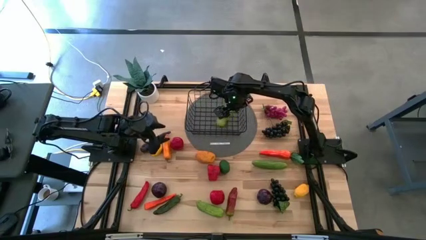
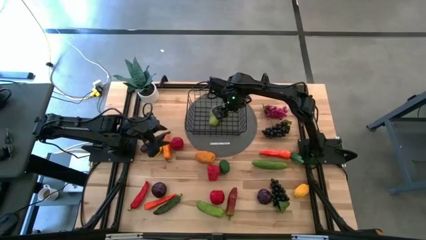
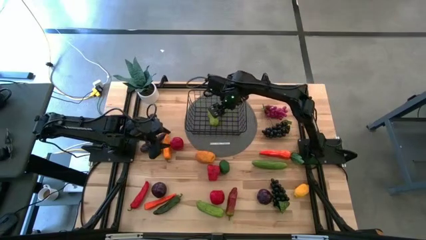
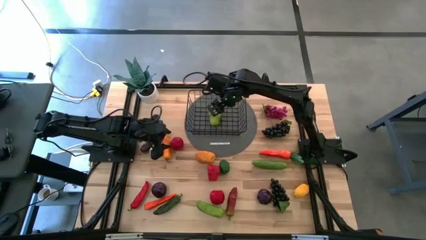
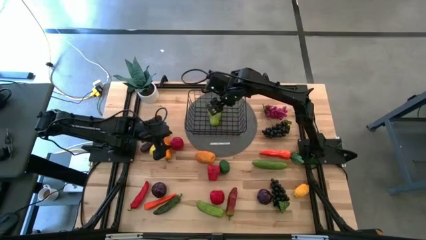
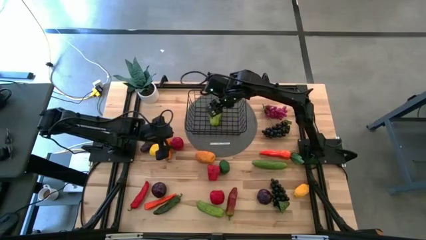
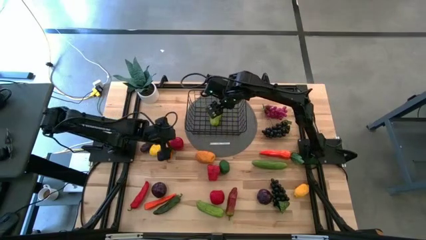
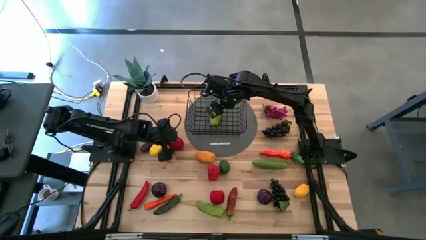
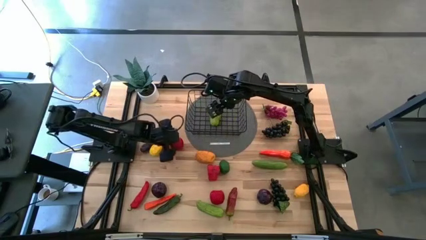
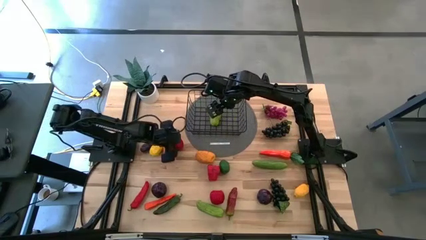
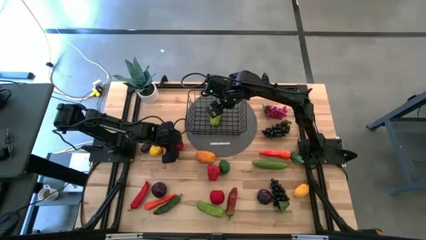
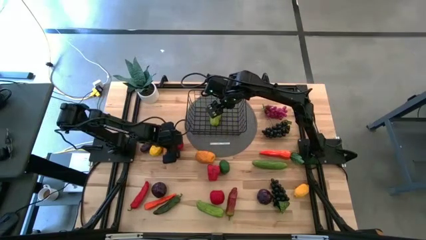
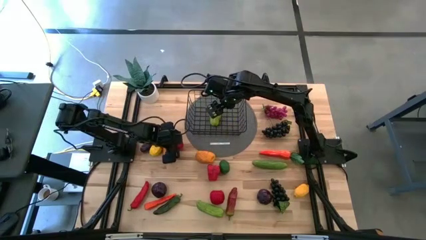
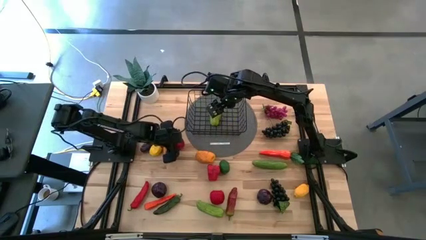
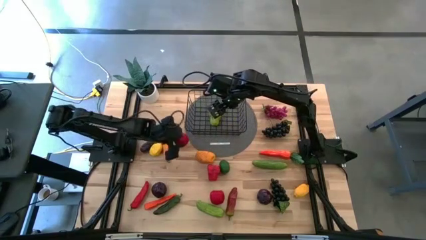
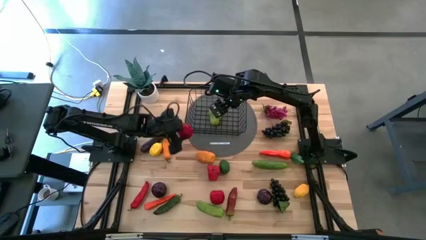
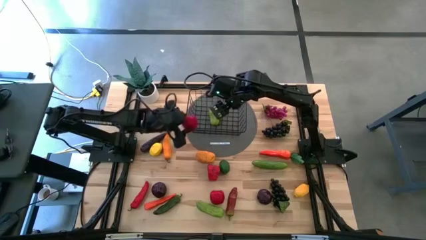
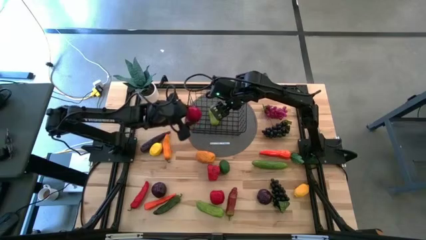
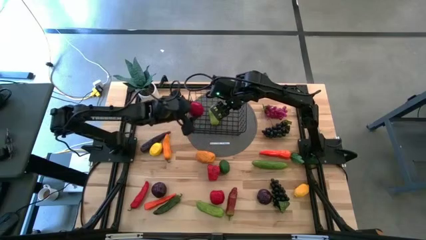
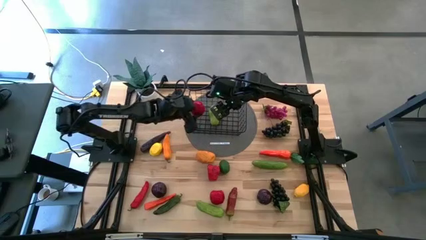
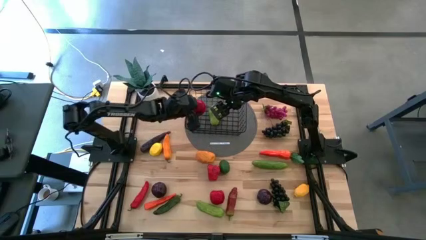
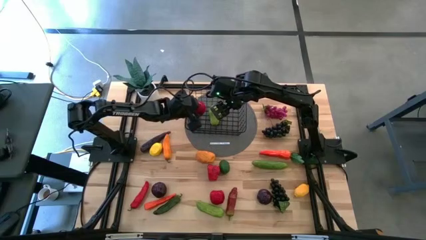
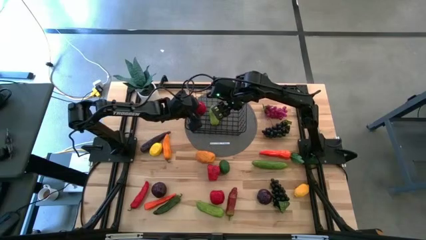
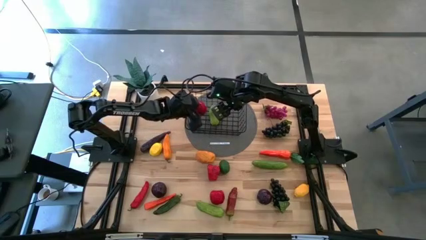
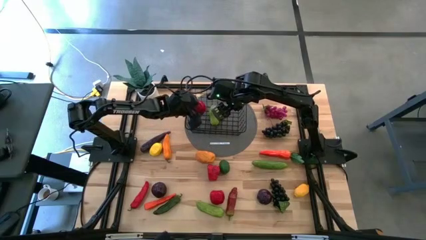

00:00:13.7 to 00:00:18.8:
Task: Build produce basket
Put the top apple into the wire basket

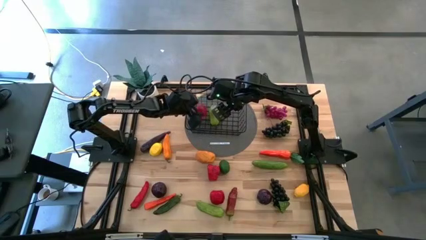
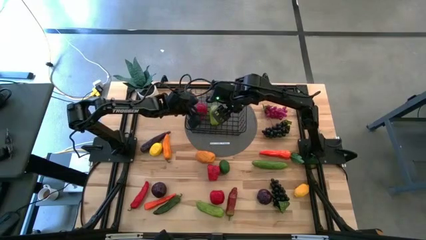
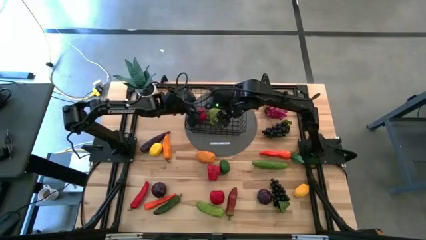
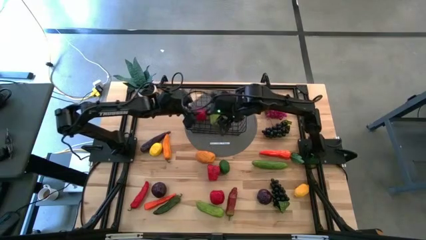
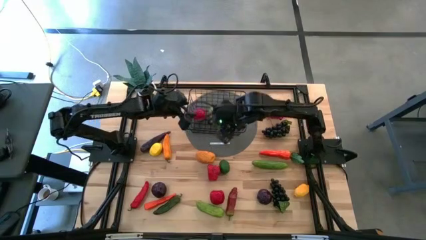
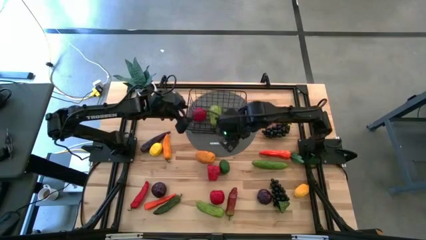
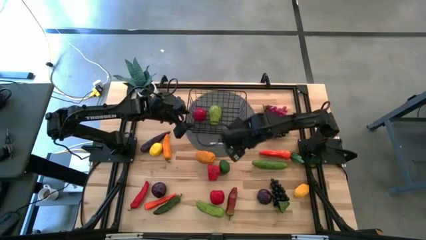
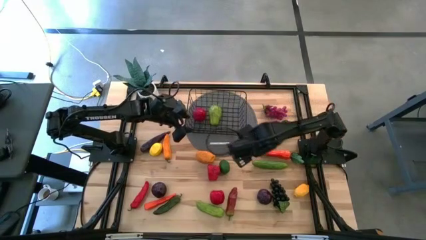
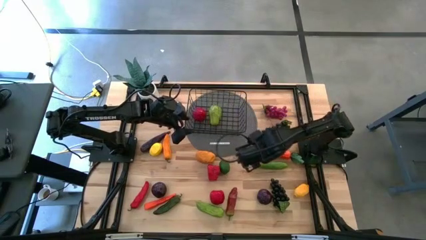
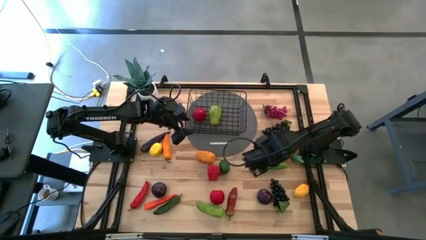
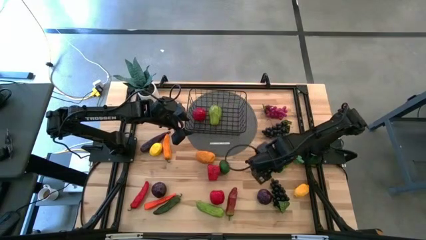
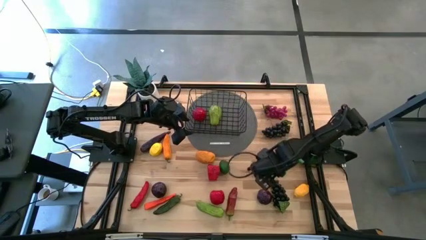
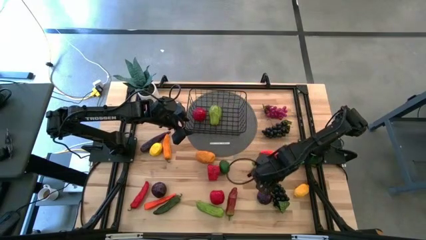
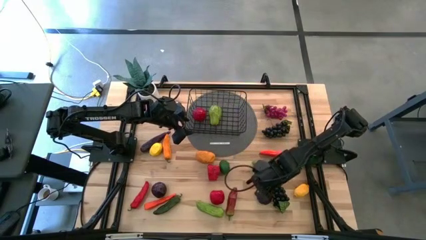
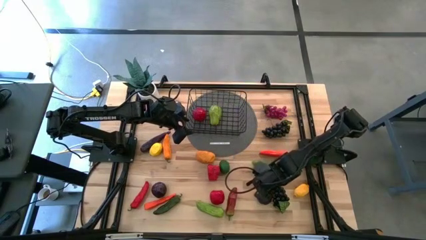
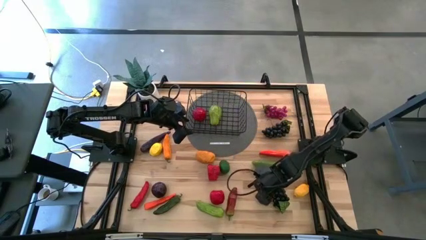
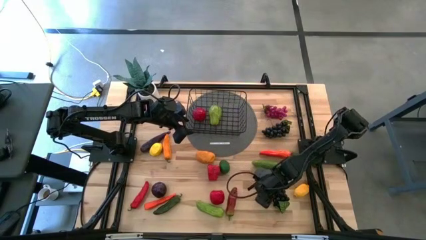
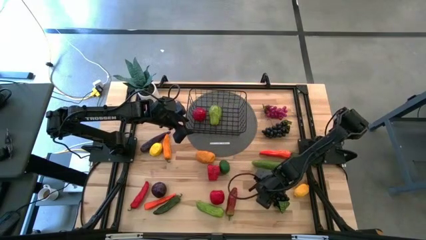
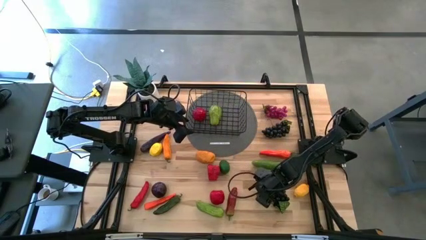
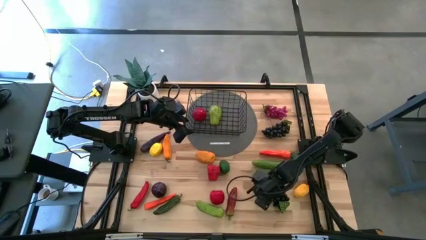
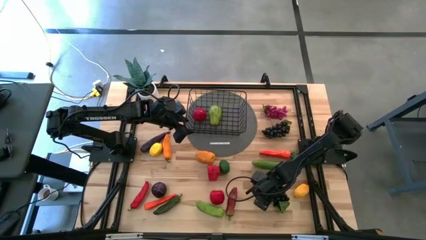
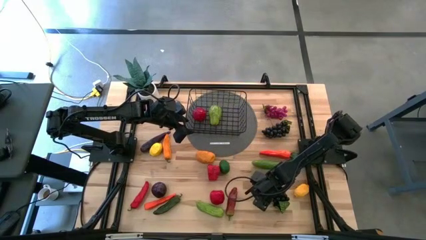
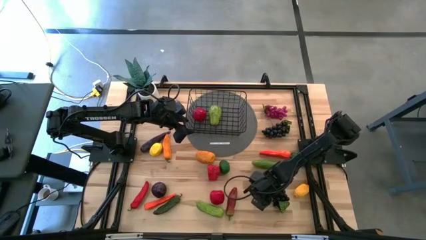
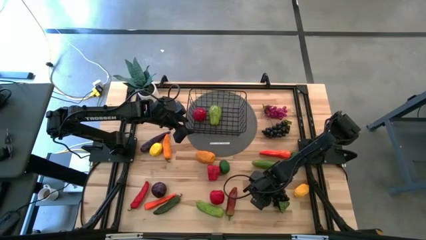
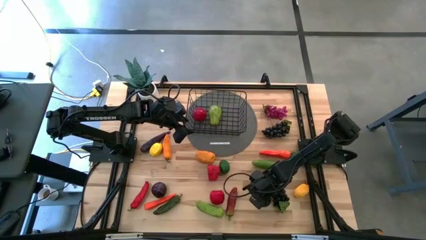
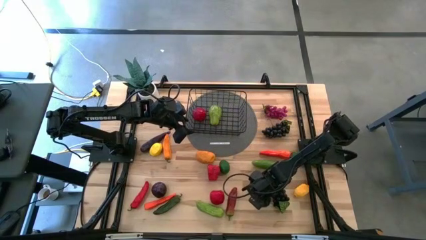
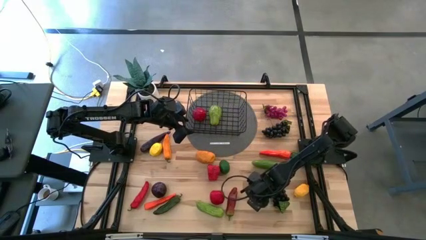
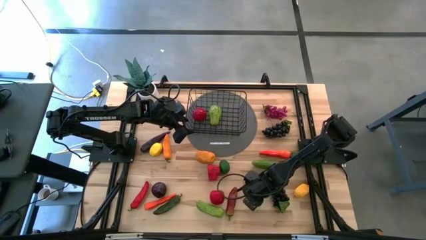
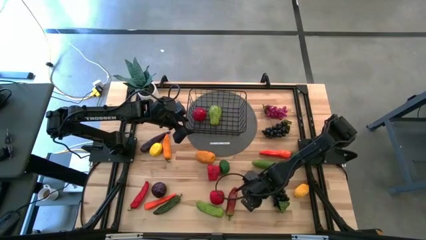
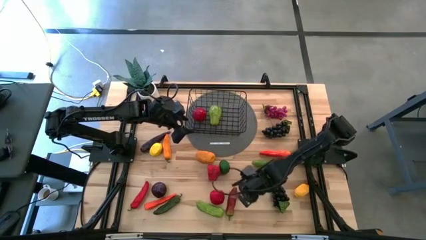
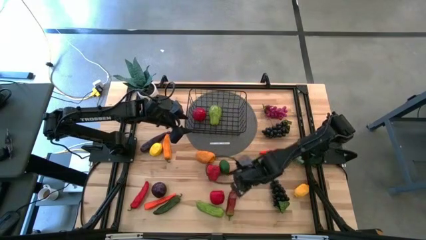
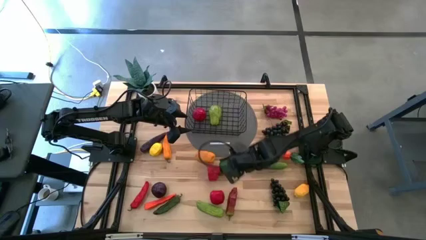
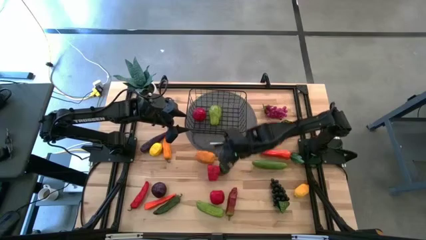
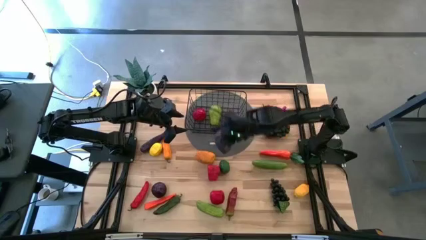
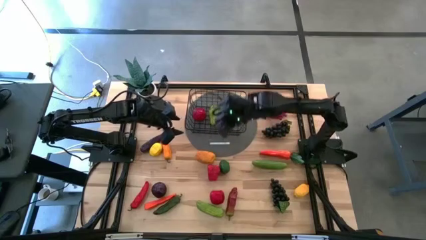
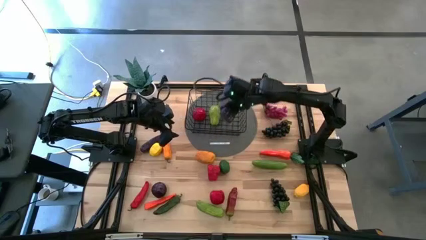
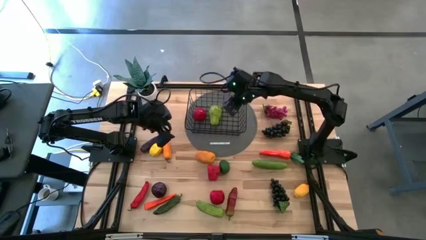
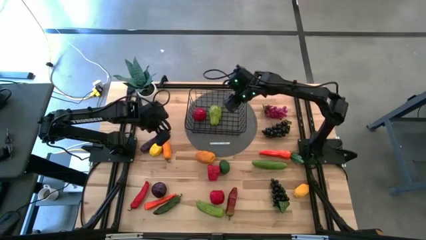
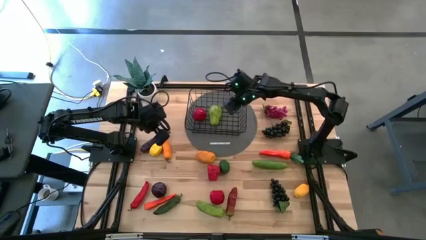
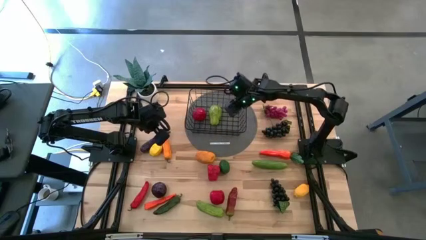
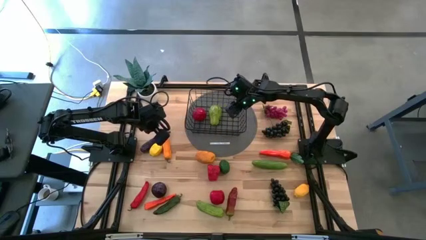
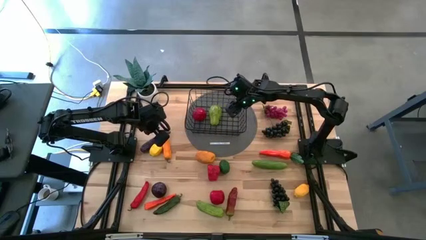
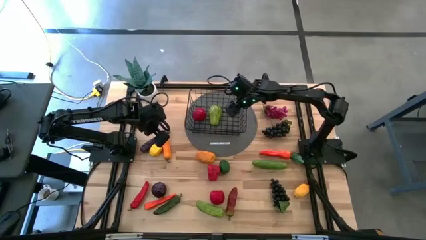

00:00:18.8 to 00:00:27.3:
Put the bottom right onion into the wire basket

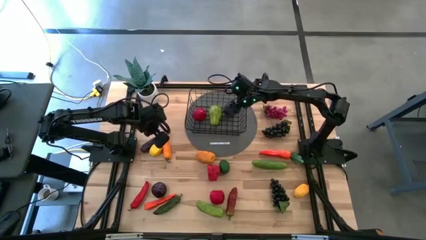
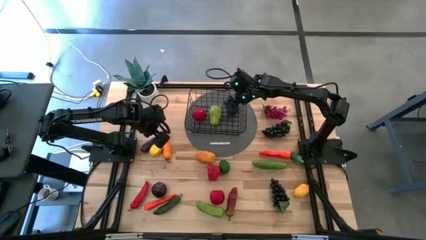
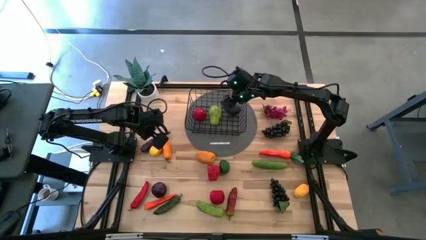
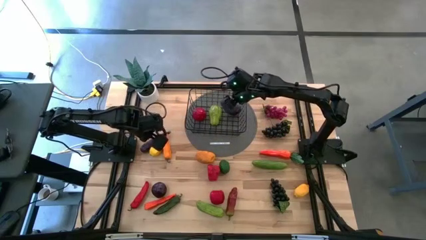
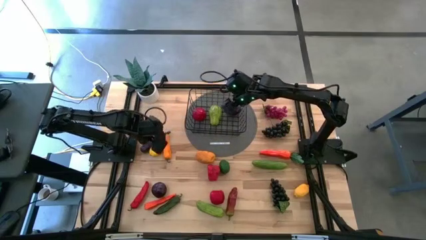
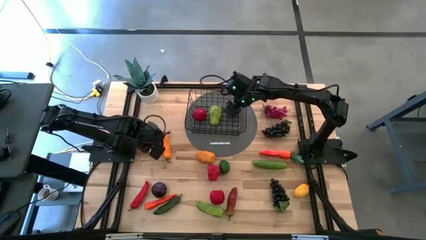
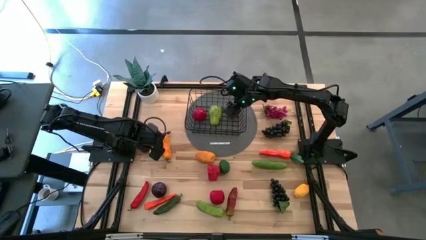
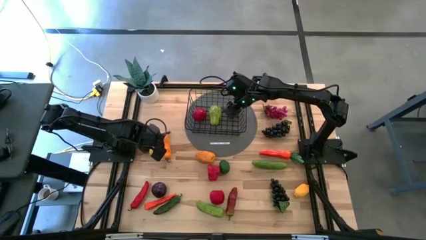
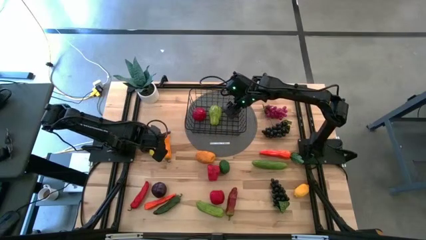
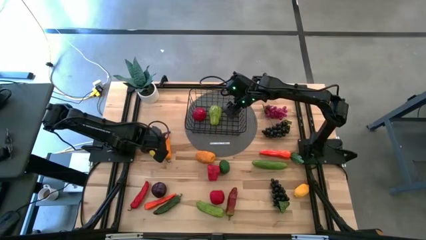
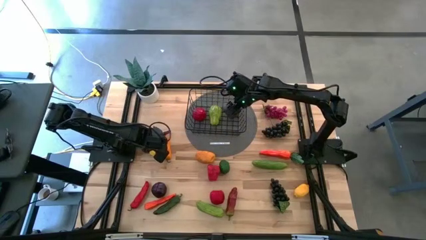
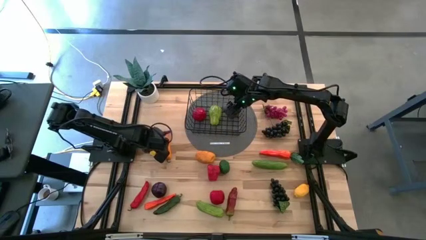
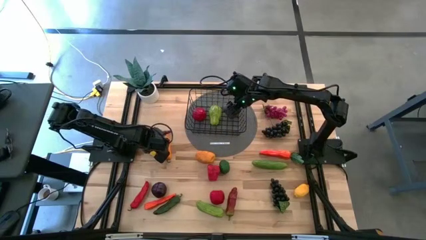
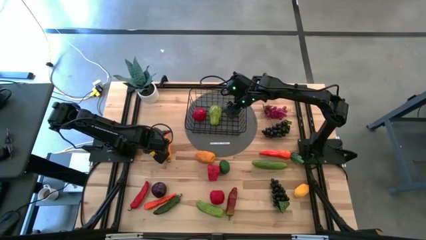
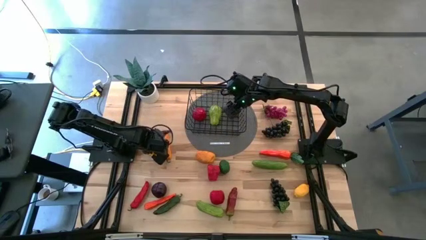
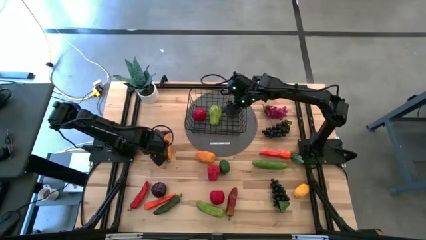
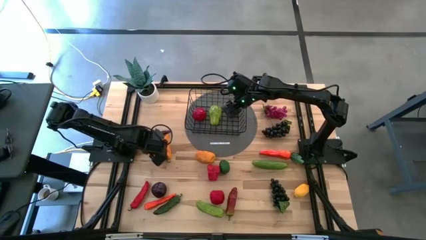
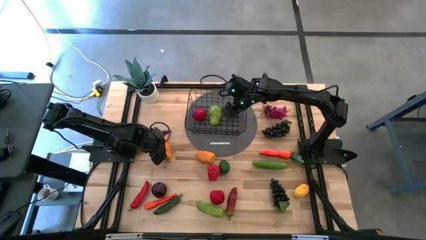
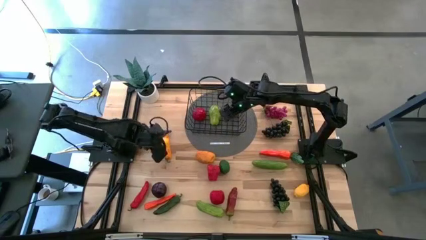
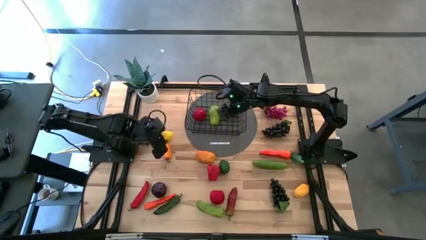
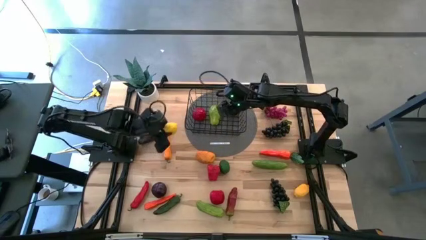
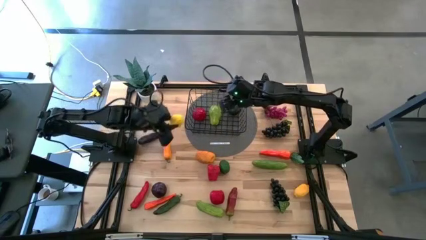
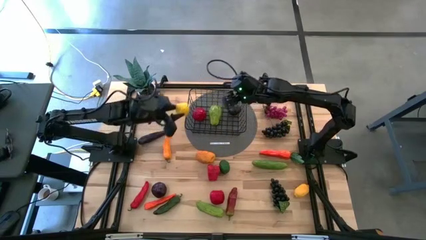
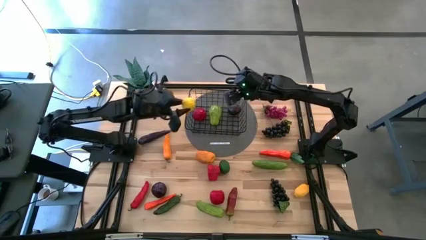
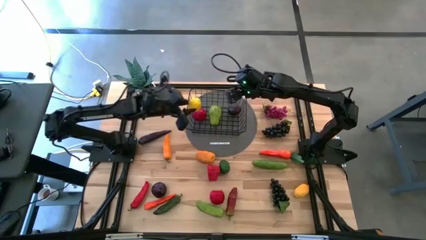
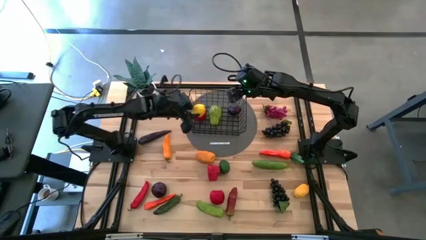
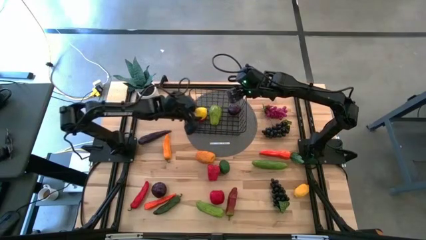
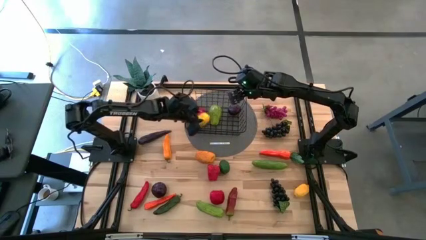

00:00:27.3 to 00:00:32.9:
Put the left lemon into the wire basket
